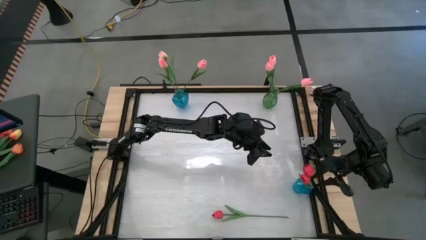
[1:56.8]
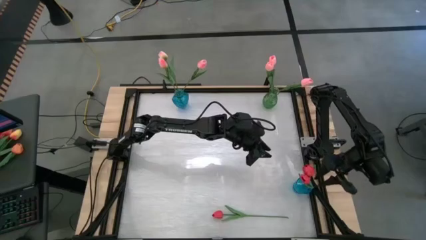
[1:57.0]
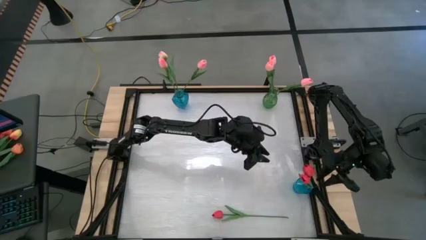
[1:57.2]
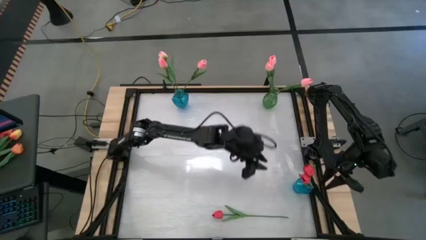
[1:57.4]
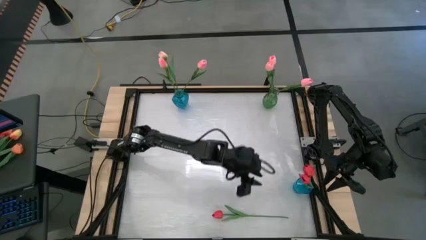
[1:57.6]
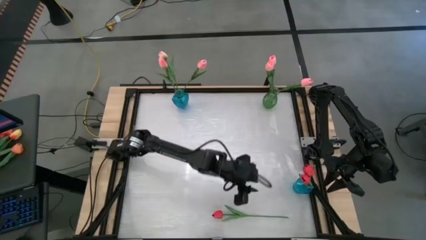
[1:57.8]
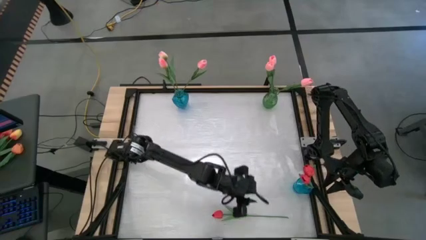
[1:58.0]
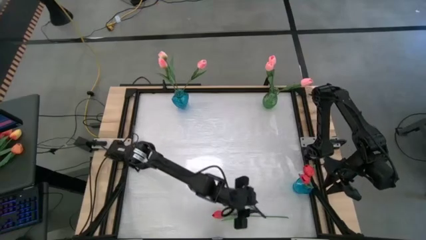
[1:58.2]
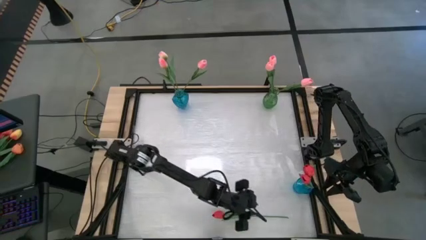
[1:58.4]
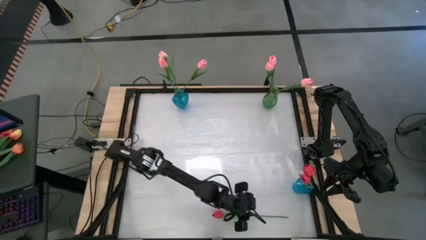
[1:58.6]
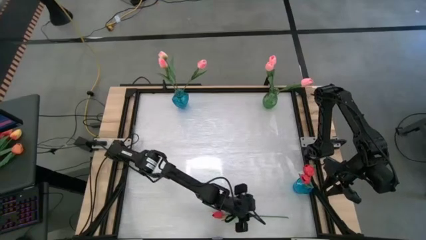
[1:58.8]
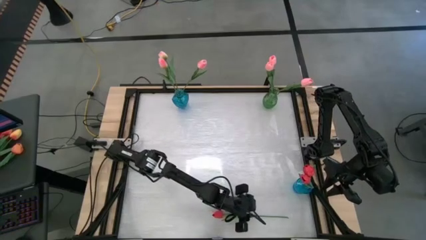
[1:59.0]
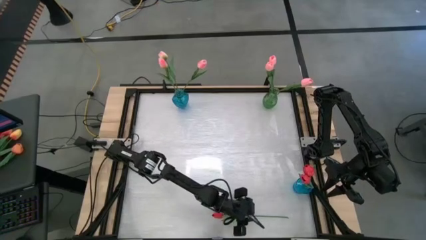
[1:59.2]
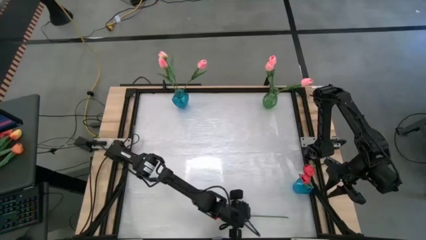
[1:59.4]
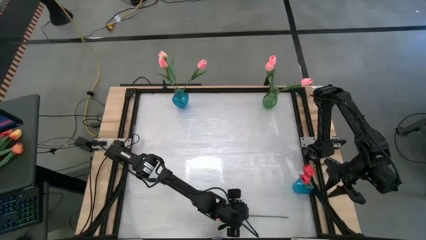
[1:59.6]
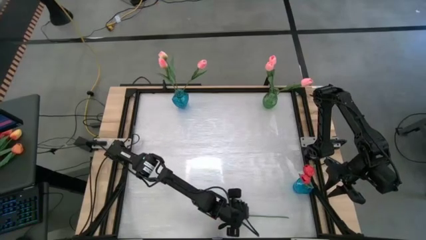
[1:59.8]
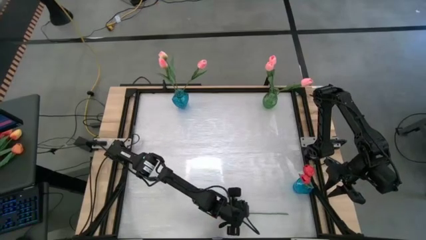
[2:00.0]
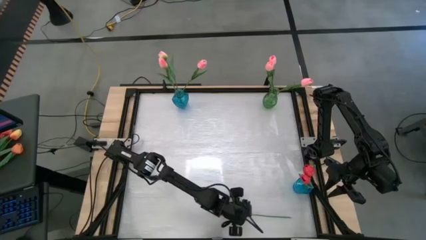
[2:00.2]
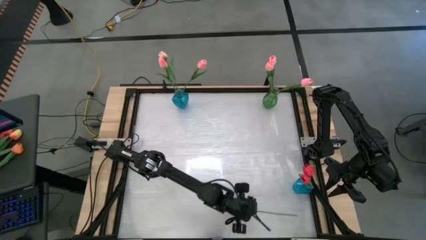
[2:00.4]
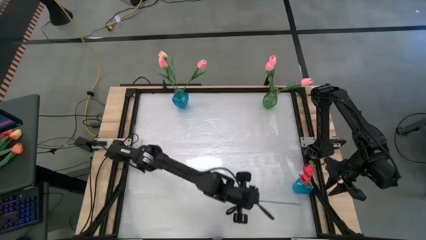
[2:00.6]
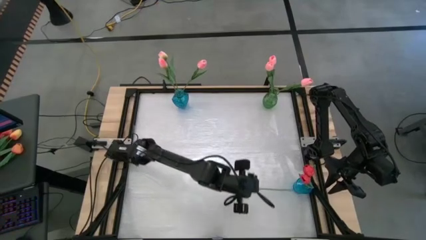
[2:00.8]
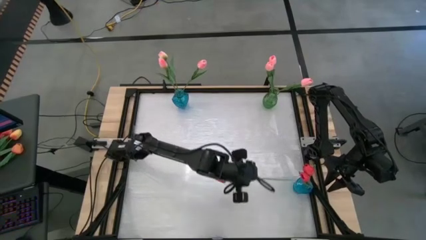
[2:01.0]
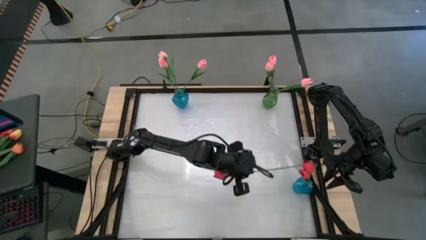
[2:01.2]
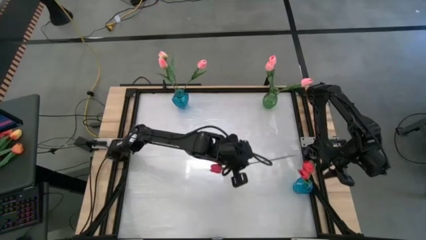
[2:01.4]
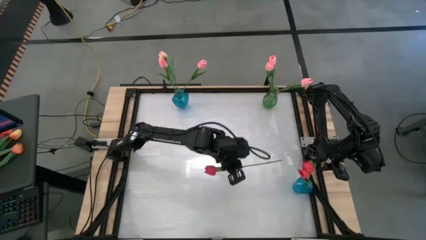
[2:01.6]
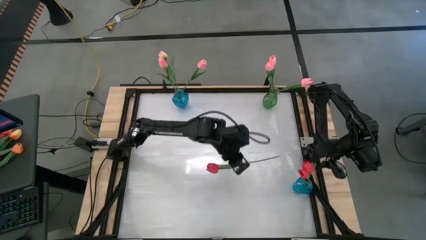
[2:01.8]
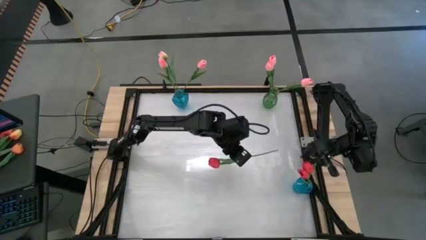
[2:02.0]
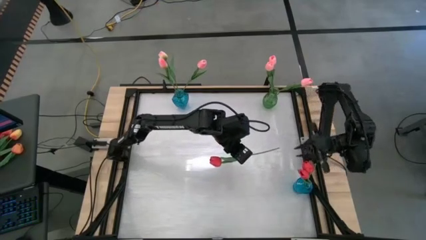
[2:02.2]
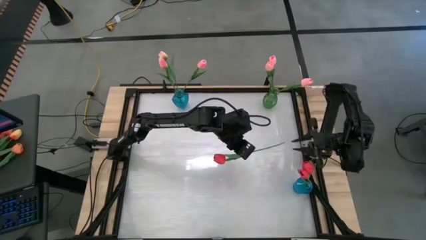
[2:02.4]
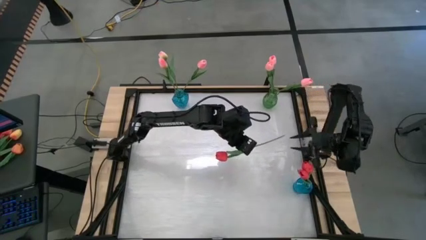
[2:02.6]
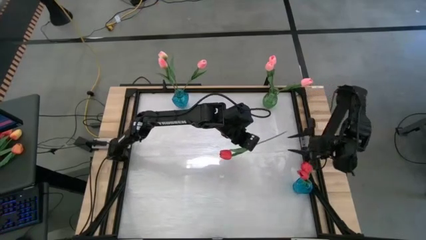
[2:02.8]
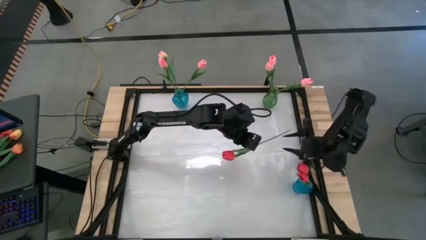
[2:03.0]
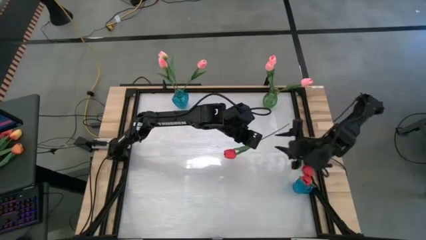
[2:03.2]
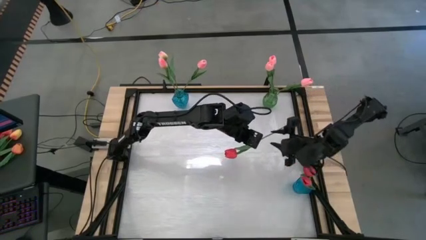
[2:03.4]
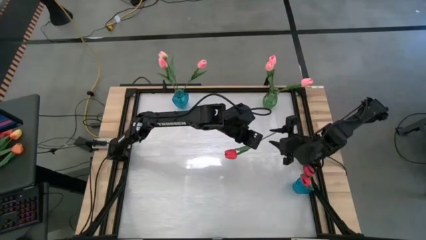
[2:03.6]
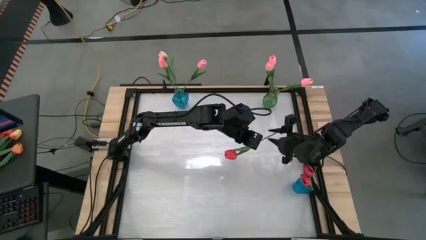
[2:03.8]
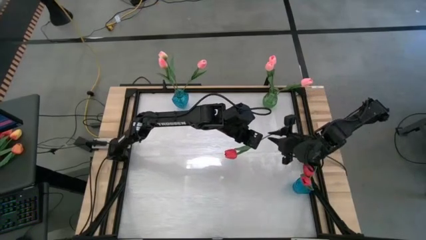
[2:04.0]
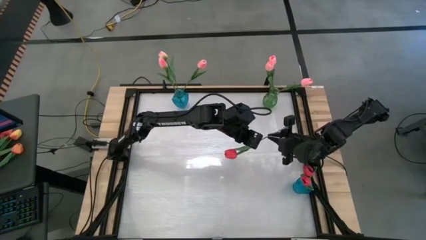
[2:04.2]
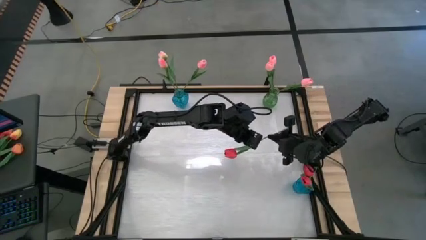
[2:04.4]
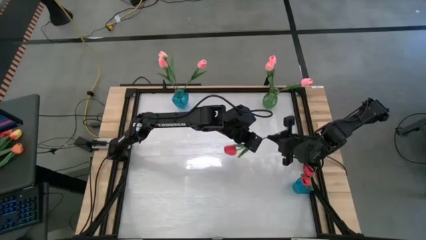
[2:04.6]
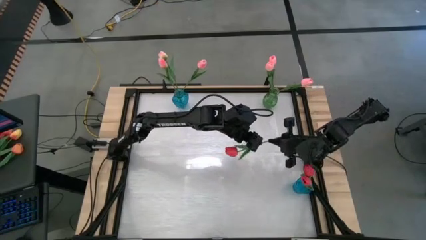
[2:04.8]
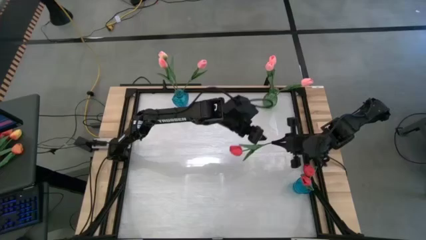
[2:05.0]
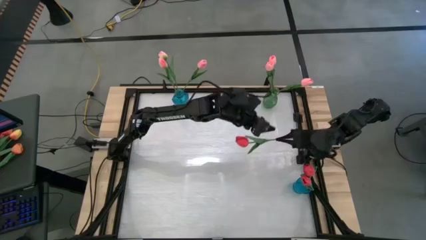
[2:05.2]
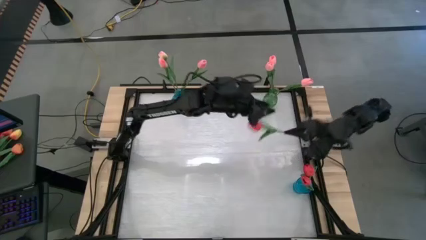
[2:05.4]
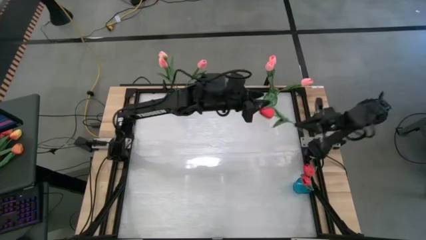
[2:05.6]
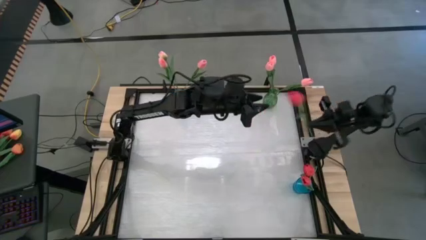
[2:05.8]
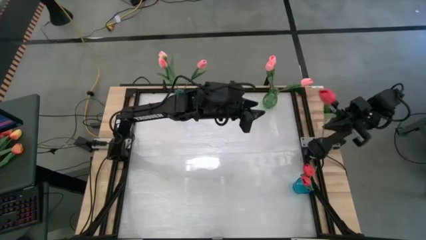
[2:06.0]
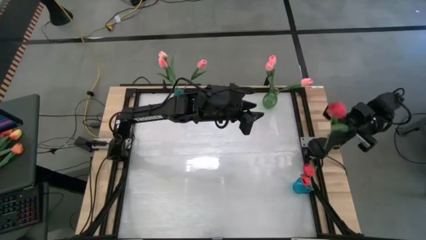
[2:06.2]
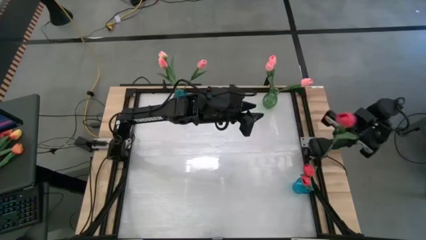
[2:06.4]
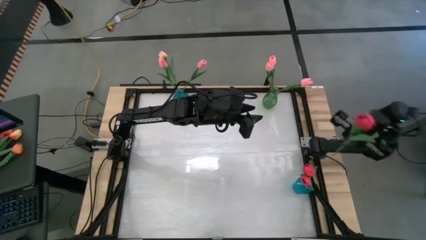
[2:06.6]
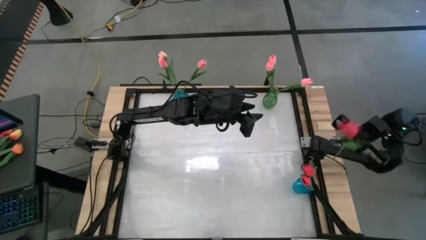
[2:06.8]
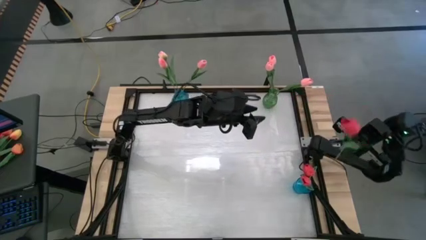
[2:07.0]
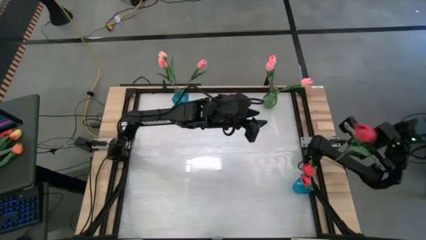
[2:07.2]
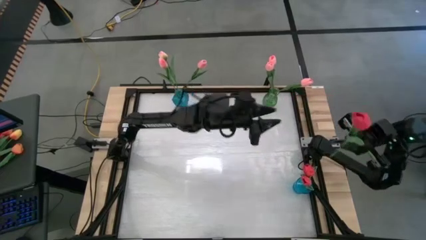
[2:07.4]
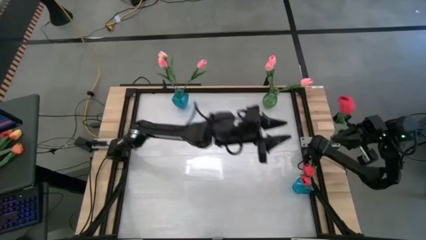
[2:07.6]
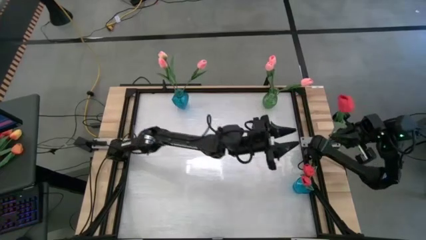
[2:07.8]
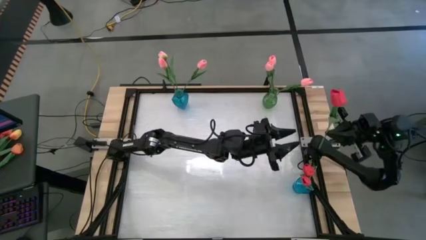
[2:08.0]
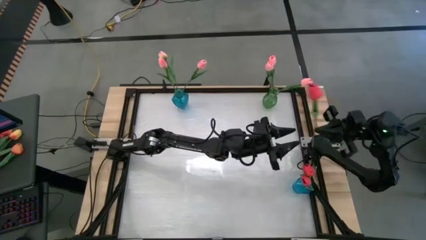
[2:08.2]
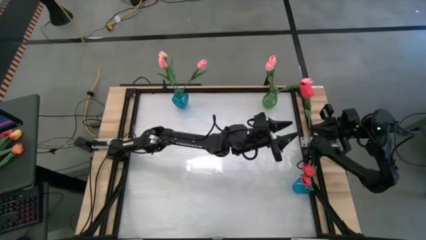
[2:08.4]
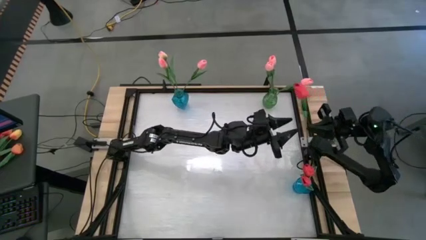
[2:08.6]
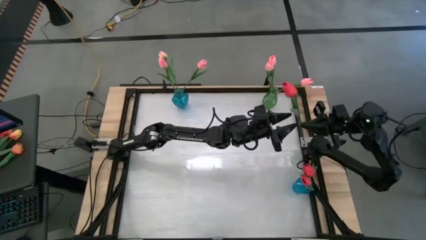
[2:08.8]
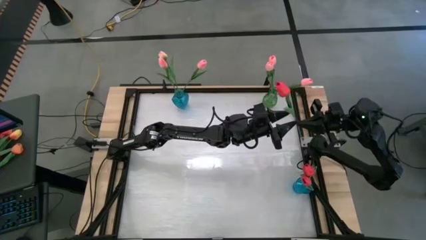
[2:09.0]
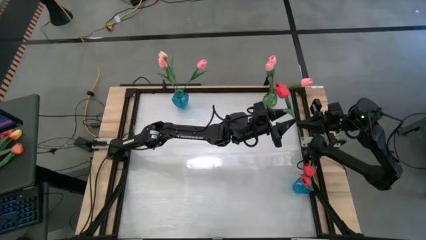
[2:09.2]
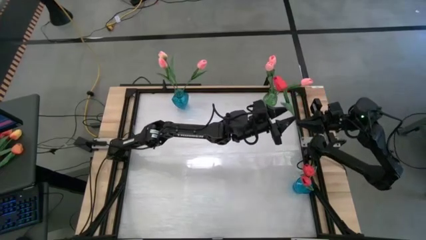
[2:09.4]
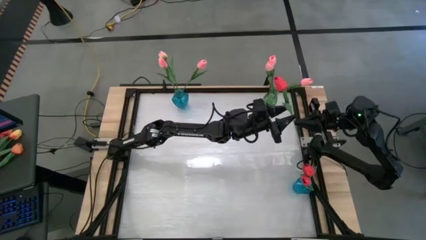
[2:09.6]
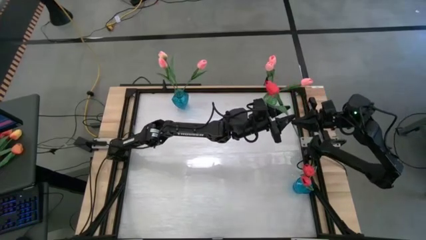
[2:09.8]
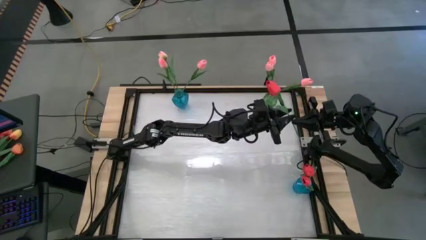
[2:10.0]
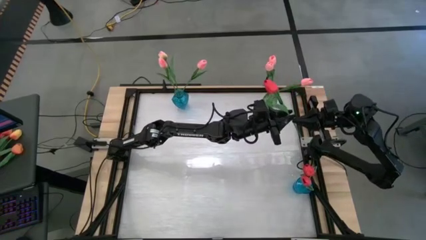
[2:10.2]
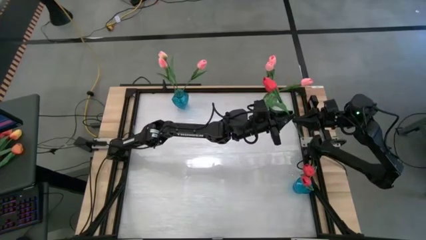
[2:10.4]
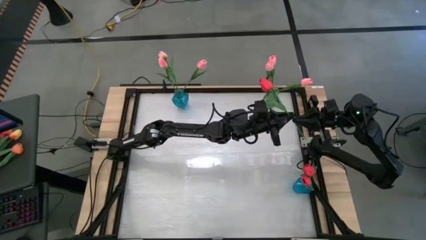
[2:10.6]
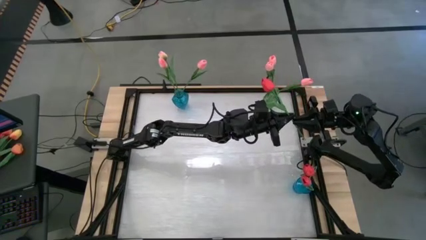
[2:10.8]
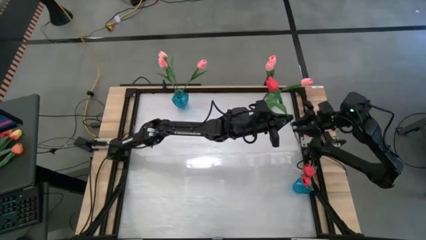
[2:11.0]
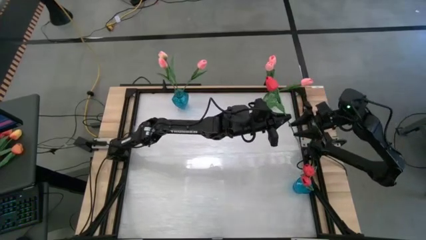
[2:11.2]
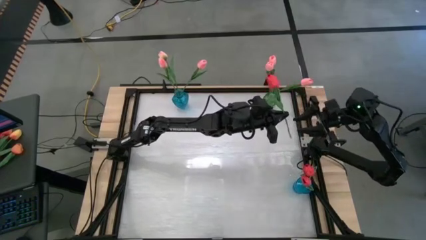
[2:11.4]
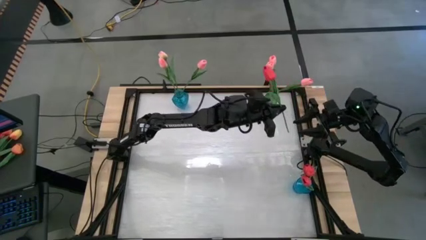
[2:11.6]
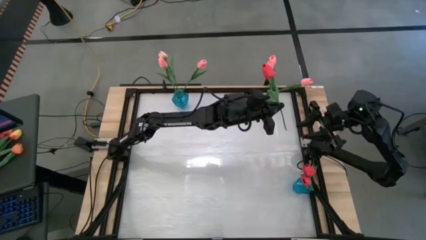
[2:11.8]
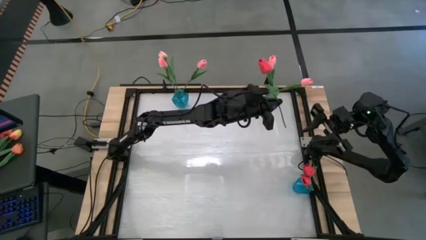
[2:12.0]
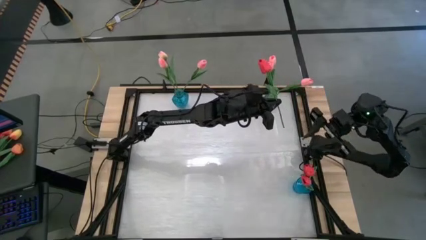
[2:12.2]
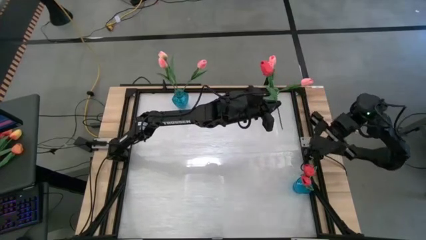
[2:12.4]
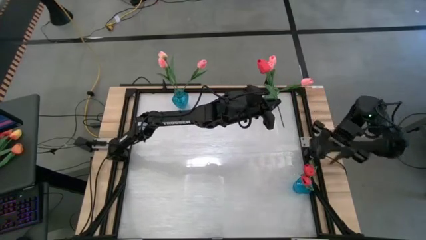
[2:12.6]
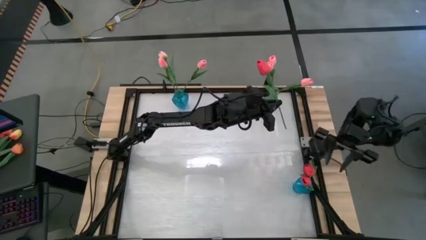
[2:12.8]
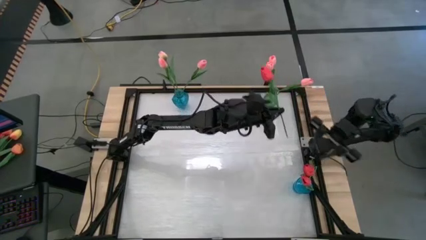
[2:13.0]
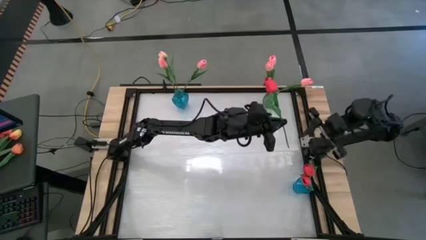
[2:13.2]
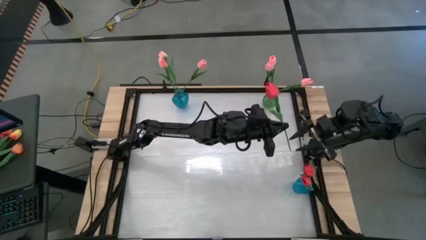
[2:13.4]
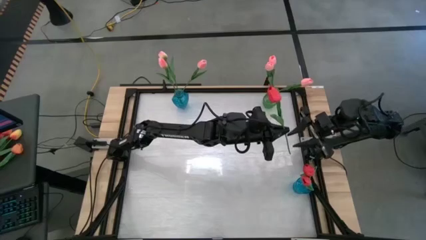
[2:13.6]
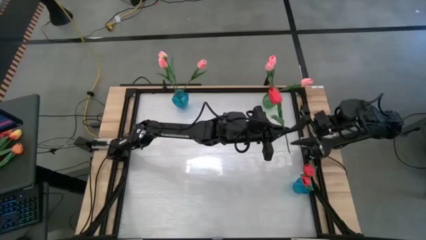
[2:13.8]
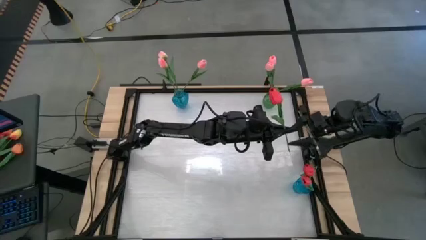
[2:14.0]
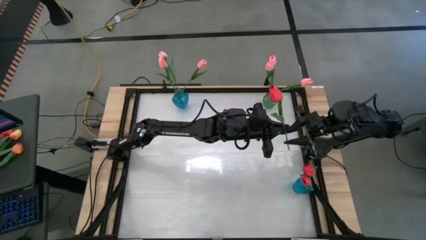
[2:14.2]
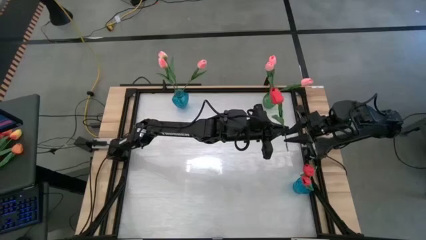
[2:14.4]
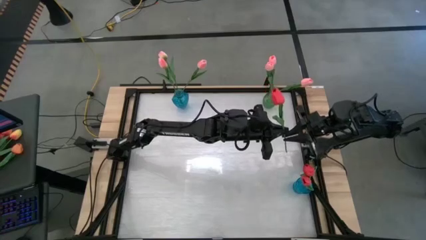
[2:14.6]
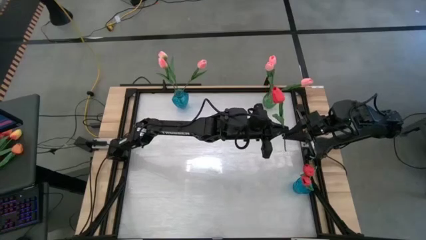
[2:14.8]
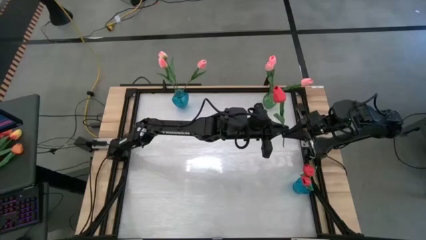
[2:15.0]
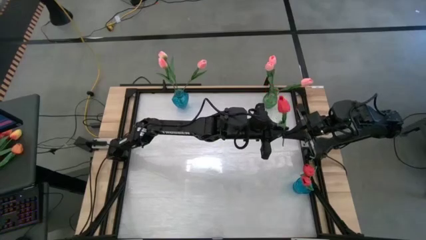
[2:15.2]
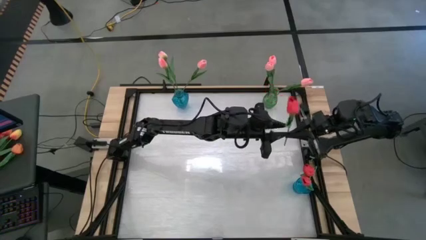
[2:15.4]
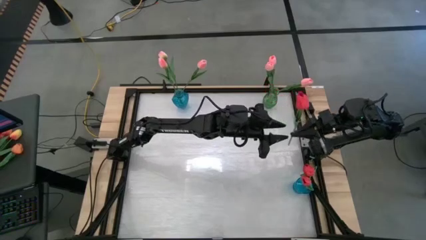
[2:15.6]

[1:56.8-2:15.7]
Task: Sort flowers into vase by color
Put the red tulip into the bottom blue vase
